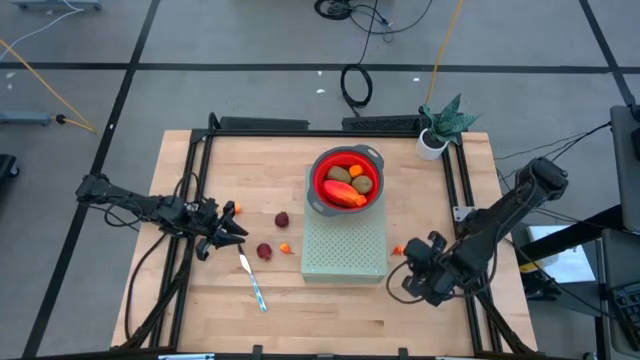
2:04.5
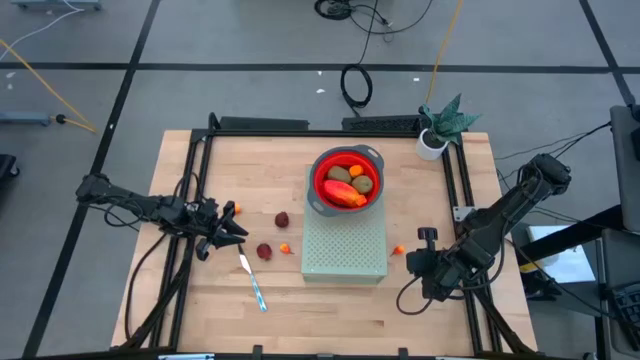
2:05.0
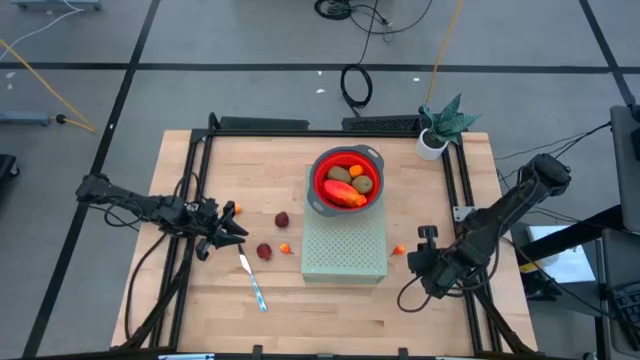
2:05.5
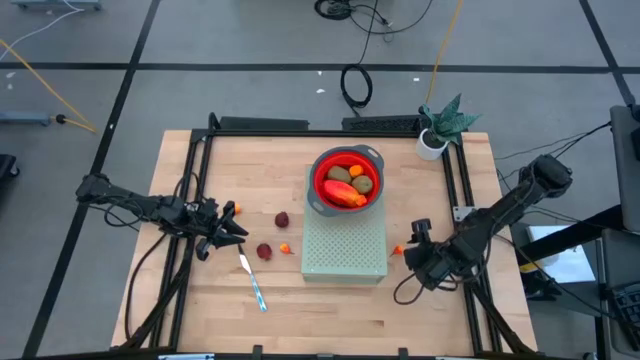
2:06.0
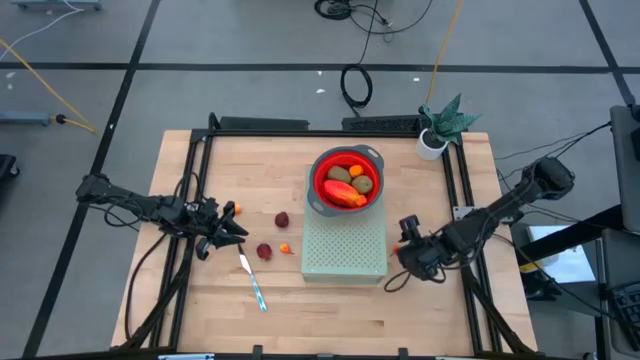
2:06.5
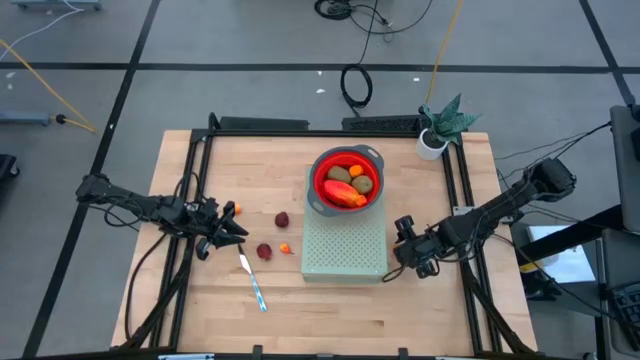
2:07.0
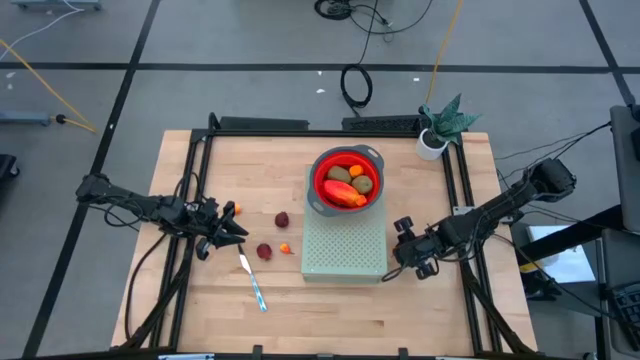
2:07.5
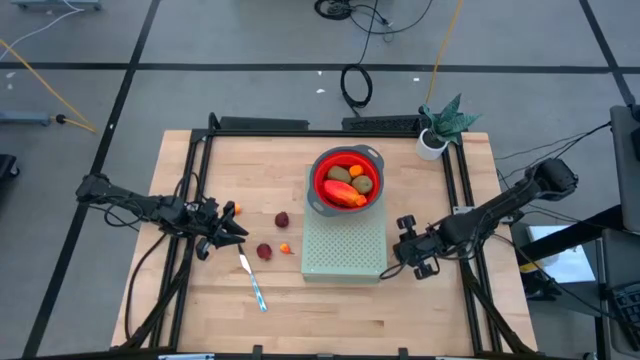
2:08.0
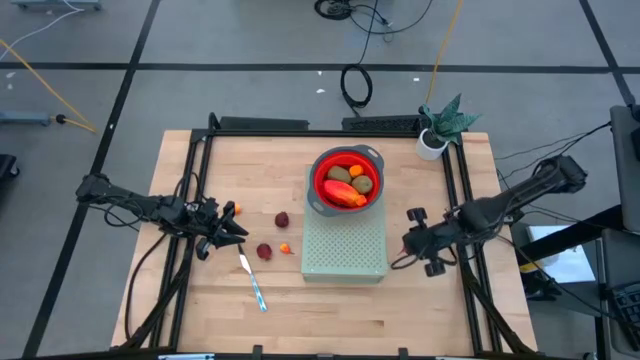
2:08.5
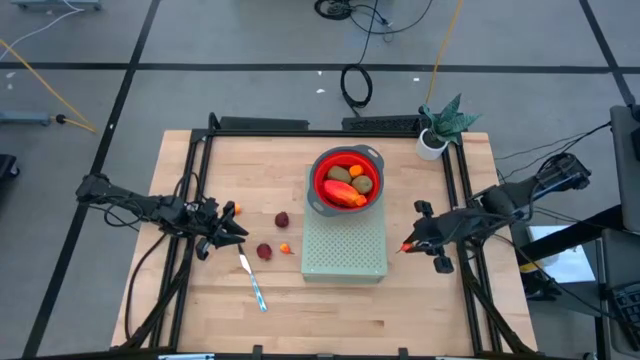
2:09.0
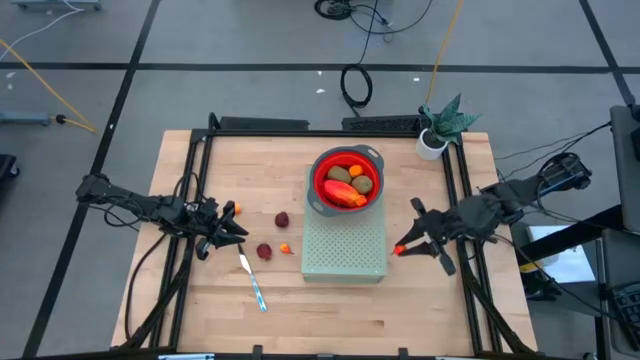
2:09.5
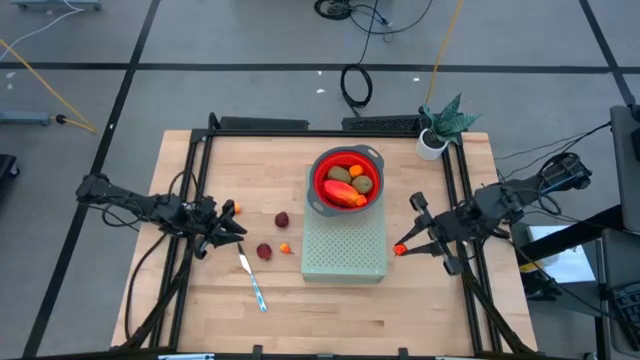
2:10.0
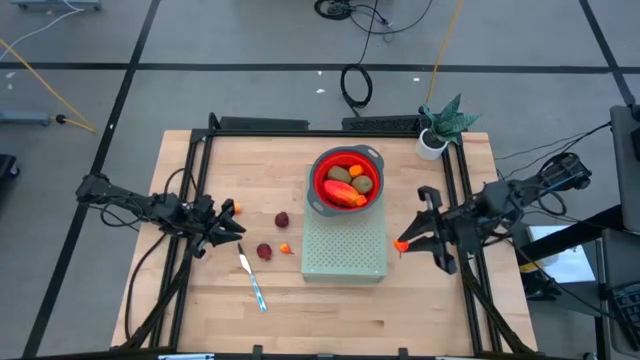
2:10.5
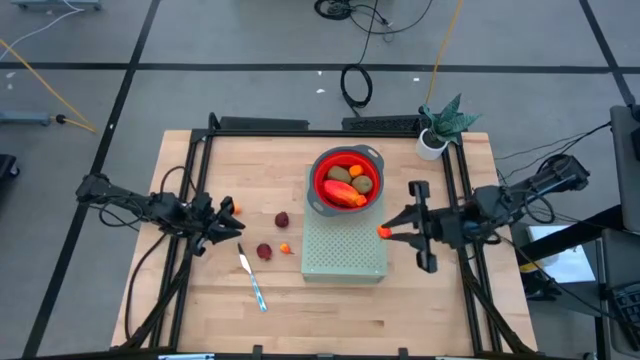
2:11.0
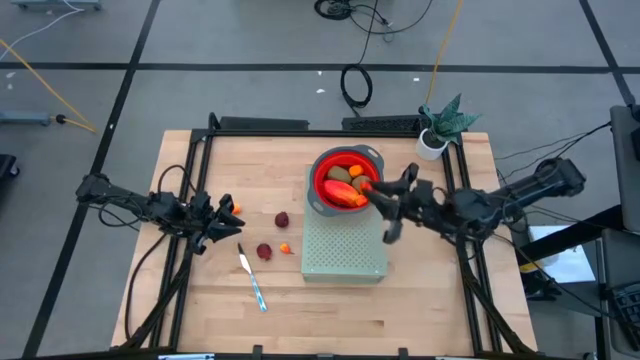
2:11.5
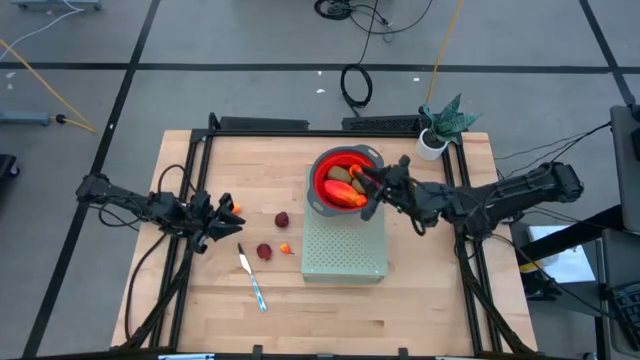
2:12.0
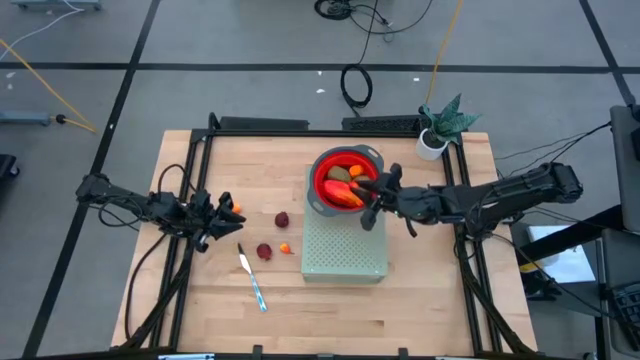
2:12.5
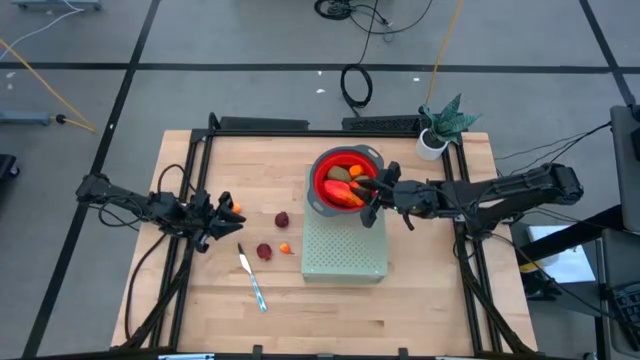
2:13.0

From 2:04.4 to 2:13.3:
Task: Pick & Place Fruit
Put the peach into the red strainer bowl on the shelf

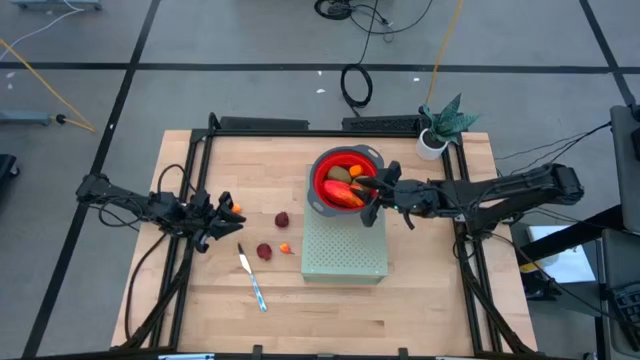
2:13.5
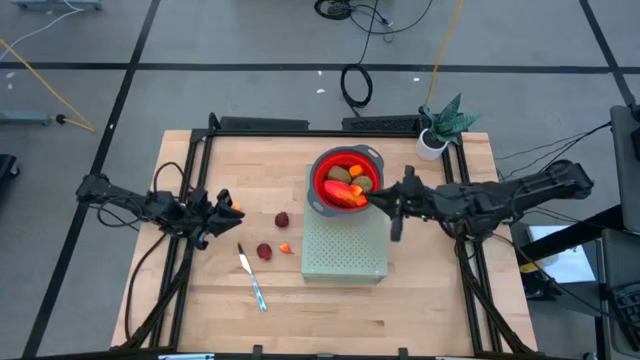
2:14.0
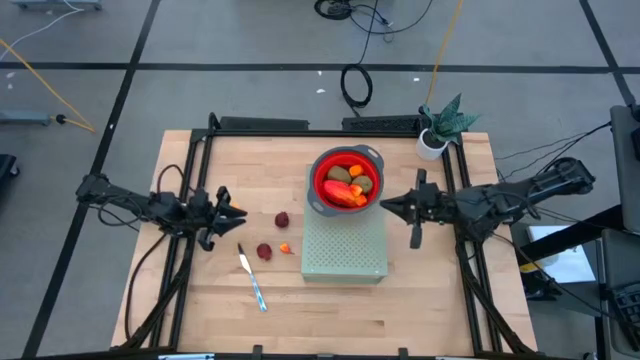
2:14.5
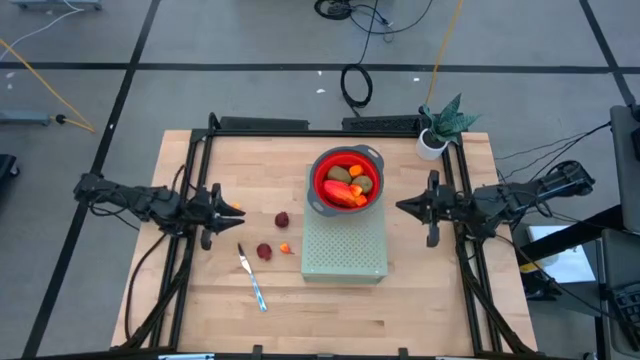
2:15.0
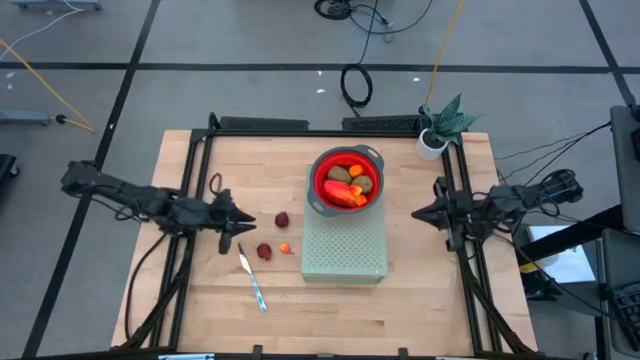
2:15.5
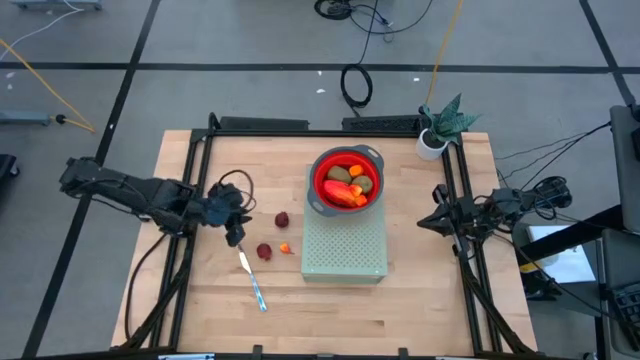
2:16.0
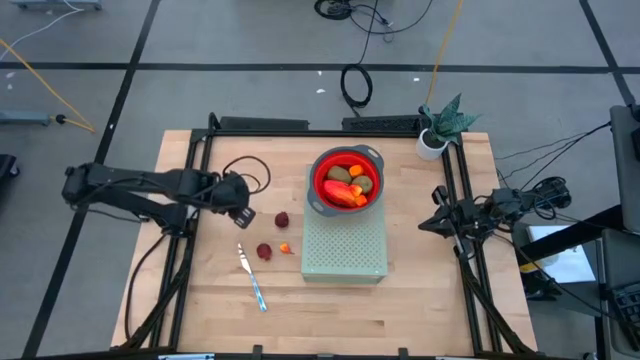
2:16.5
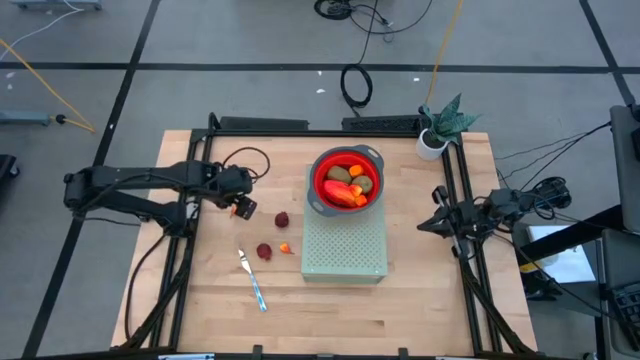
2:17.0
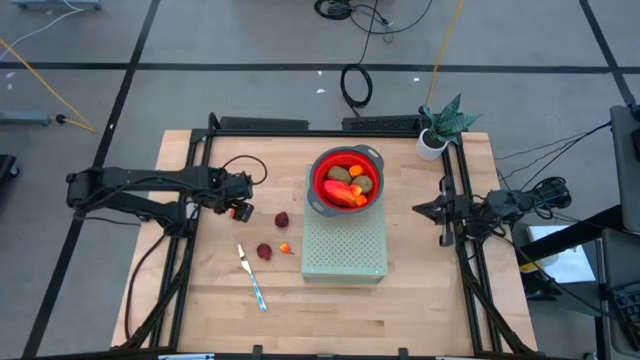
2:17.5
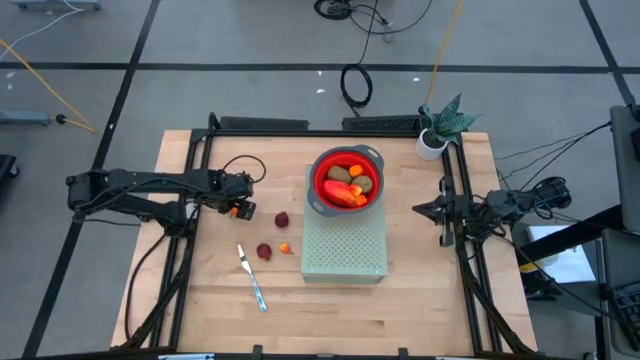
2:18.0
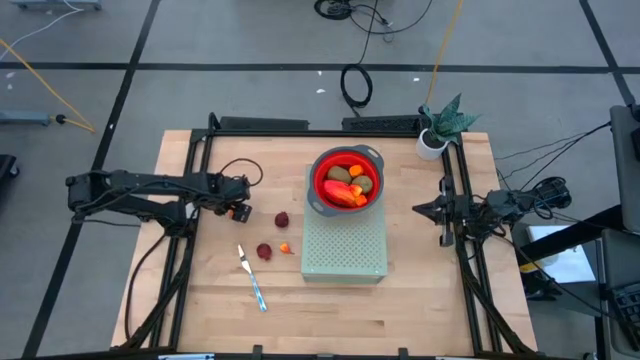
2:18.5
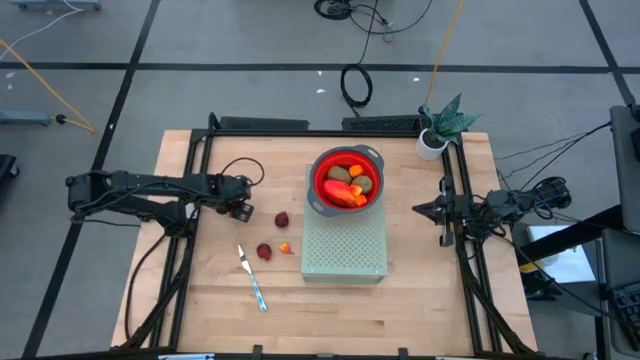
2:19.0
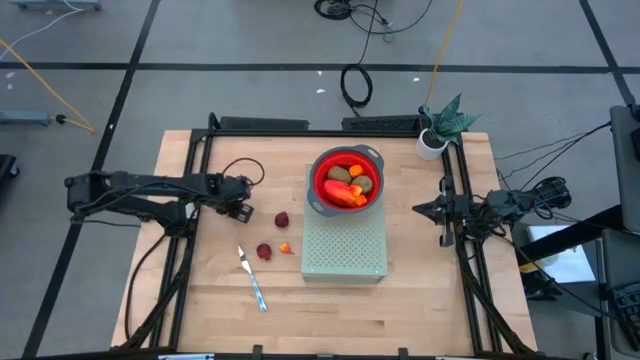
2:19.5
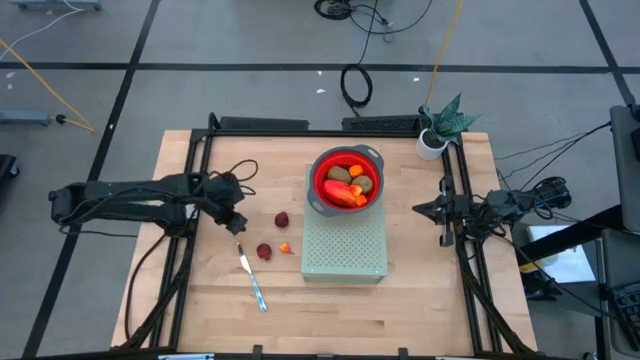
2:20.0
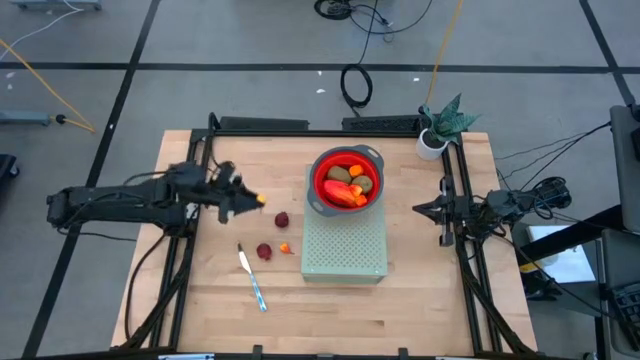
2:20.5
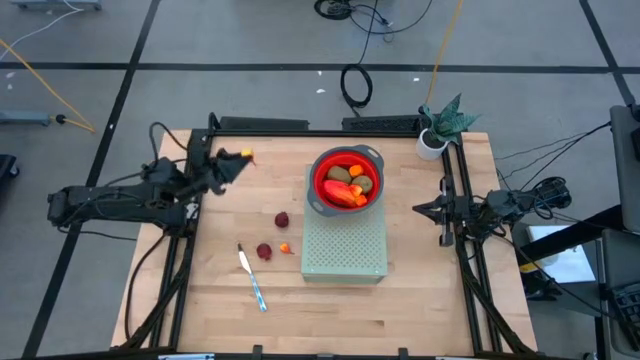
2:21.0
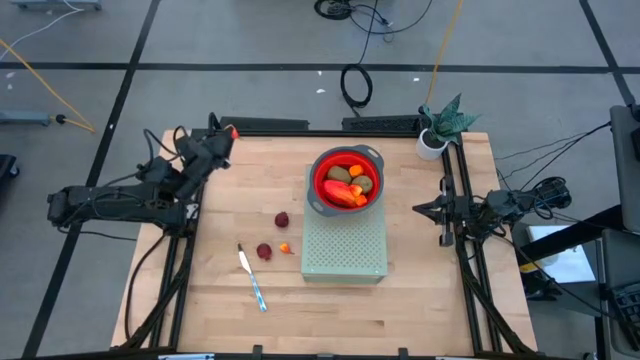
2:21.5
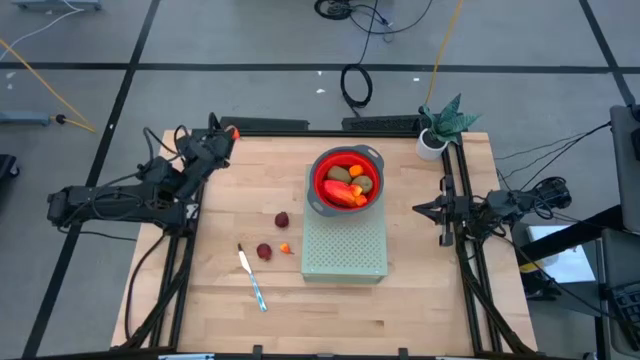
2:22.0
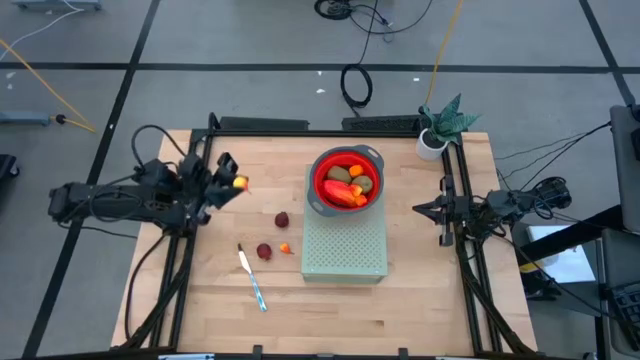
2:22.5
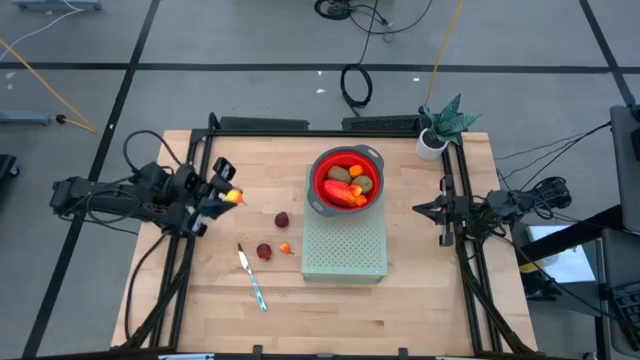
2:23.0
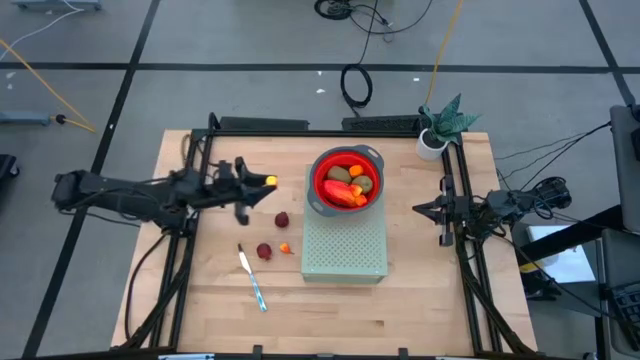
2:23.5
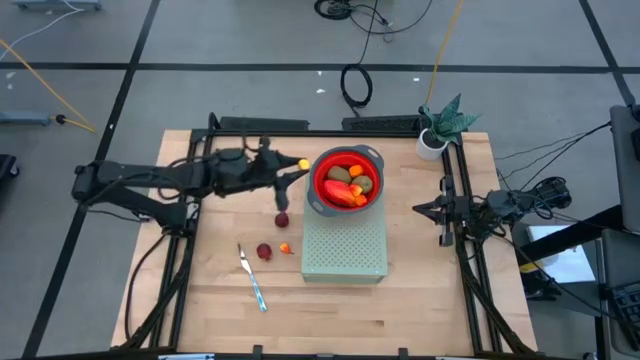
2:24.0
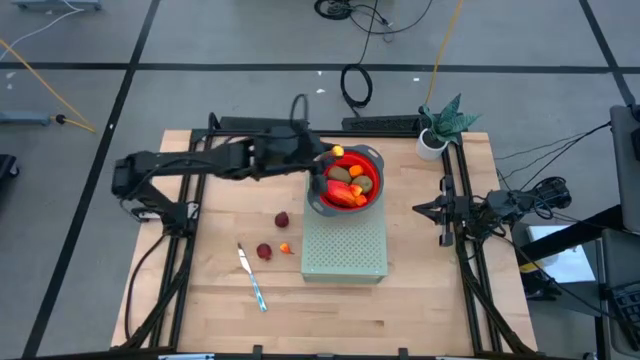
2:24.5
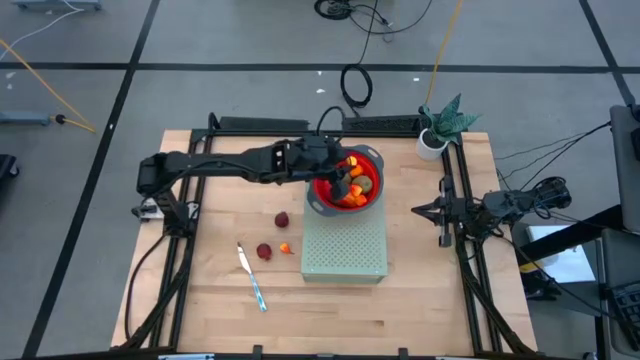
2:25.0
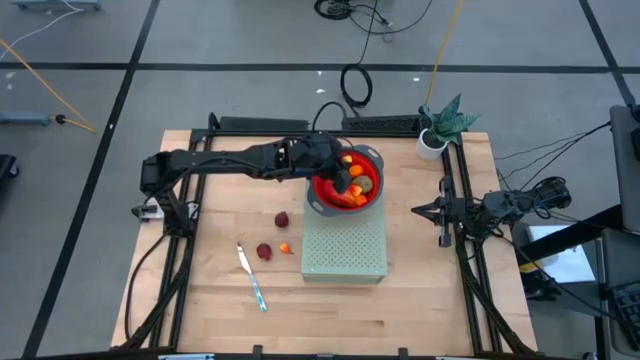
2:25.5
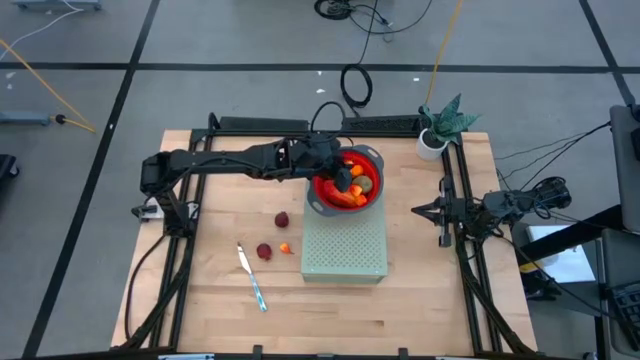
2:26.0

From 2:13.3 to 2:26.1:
Put the peach into the red strainer bowl on the shelf
